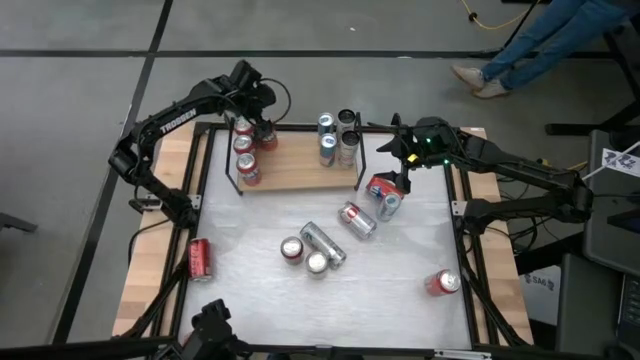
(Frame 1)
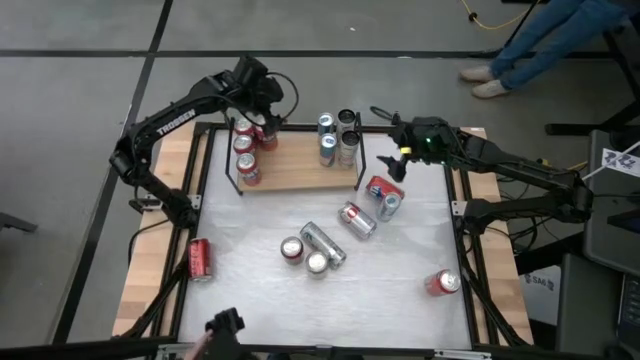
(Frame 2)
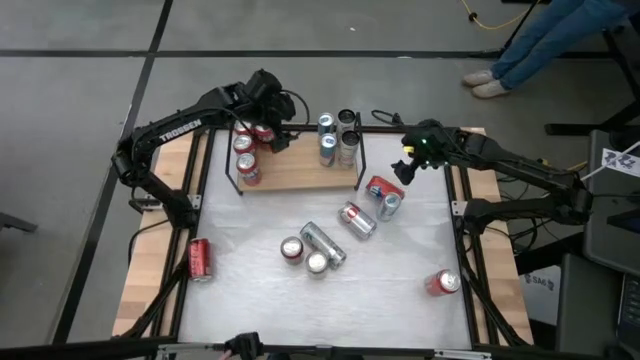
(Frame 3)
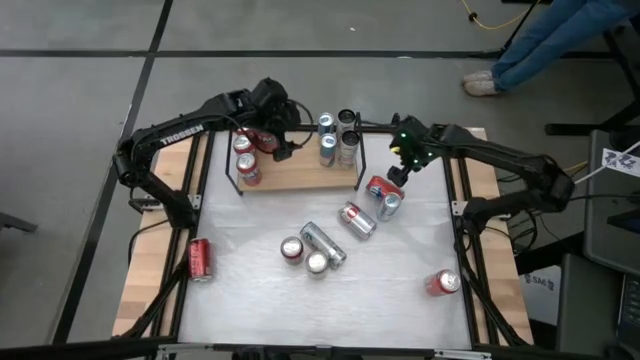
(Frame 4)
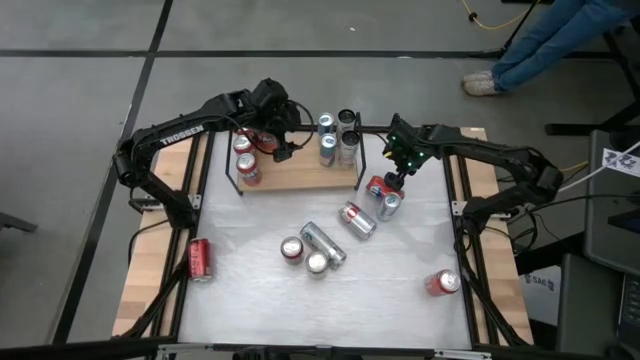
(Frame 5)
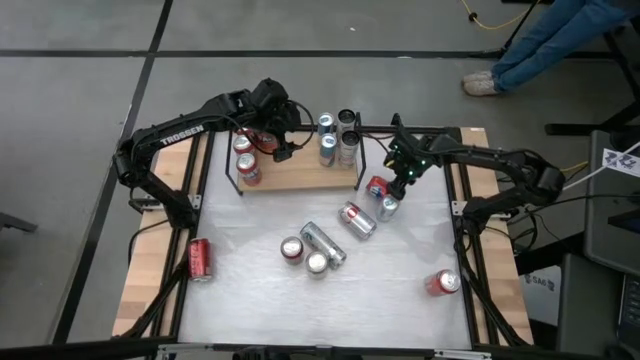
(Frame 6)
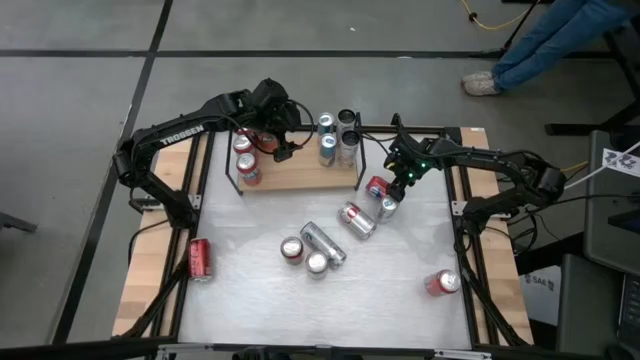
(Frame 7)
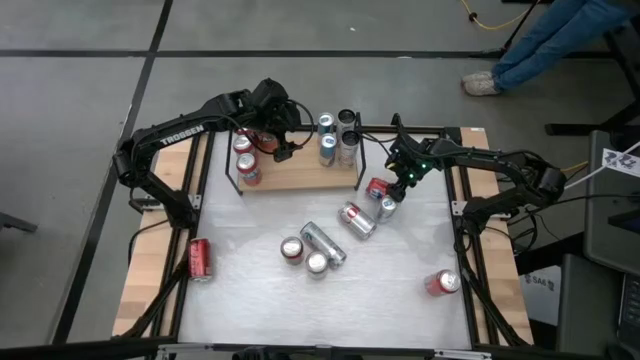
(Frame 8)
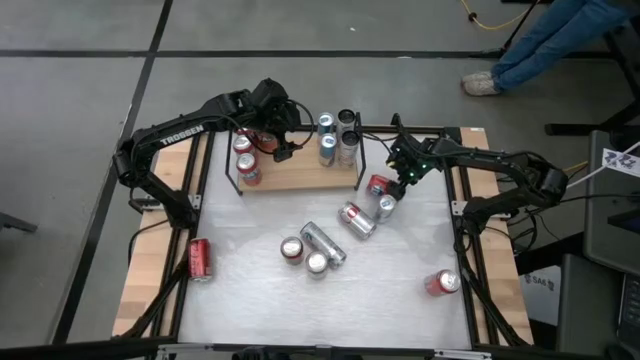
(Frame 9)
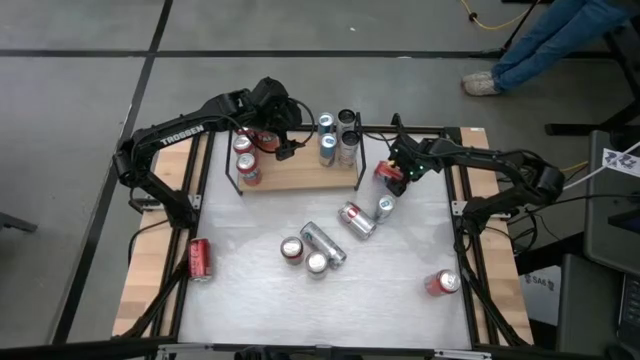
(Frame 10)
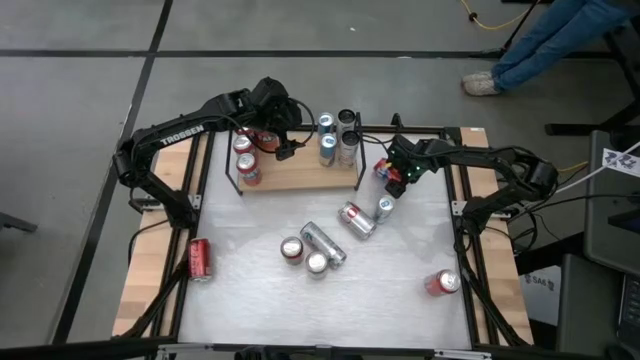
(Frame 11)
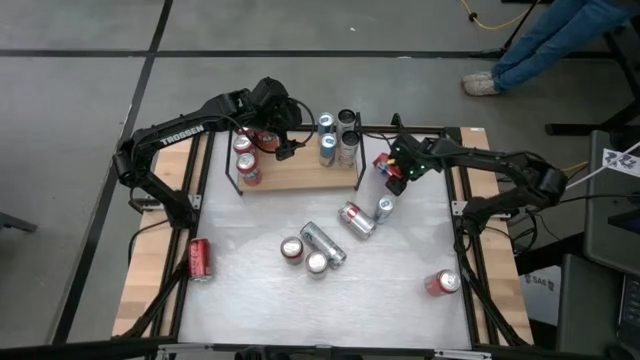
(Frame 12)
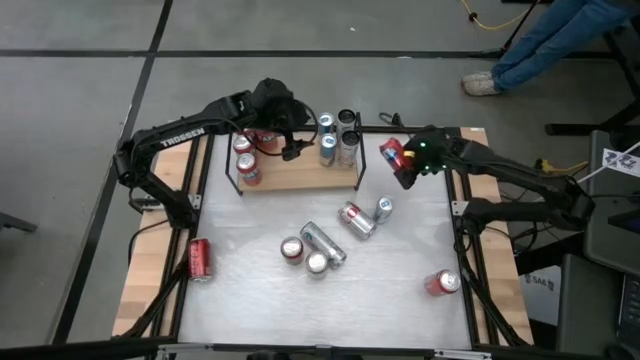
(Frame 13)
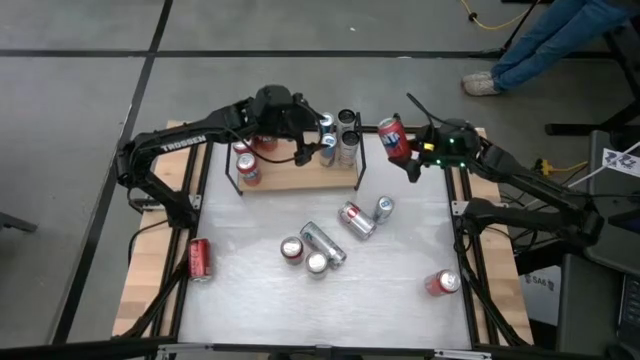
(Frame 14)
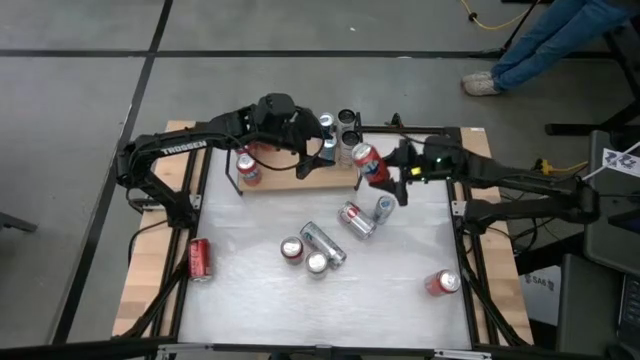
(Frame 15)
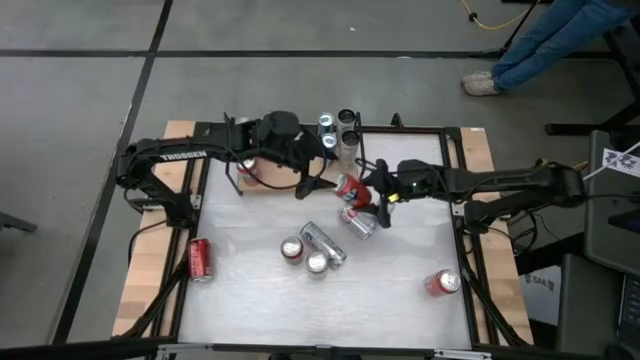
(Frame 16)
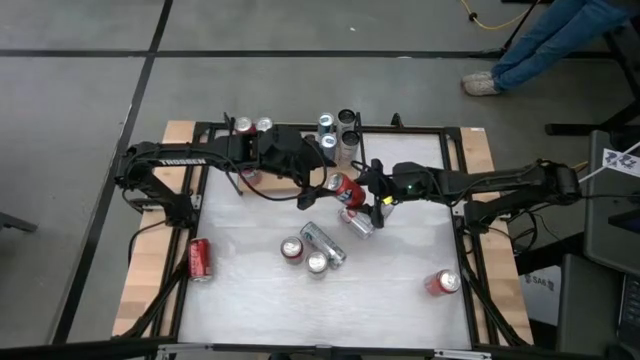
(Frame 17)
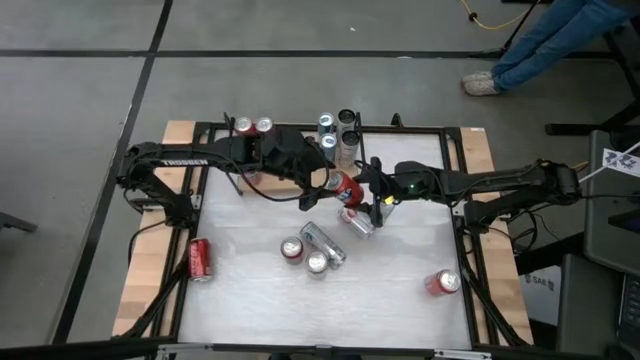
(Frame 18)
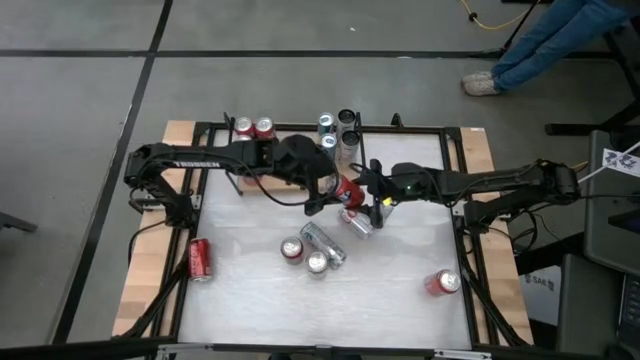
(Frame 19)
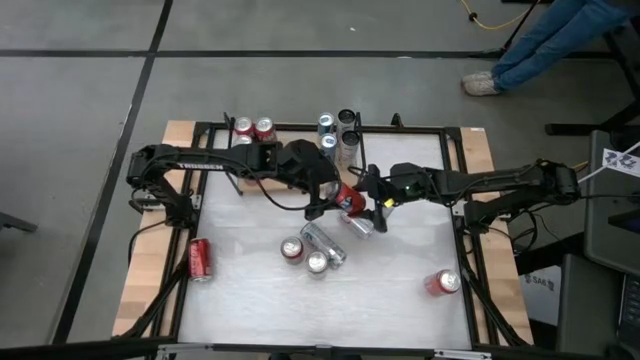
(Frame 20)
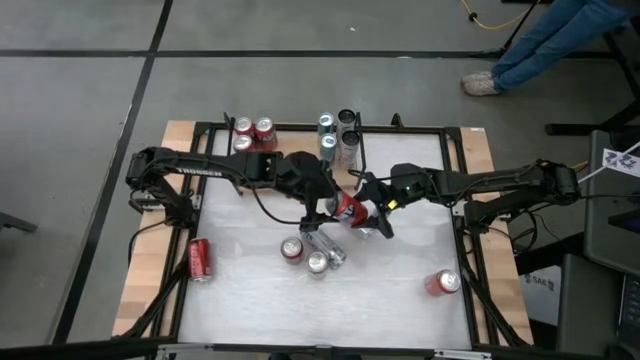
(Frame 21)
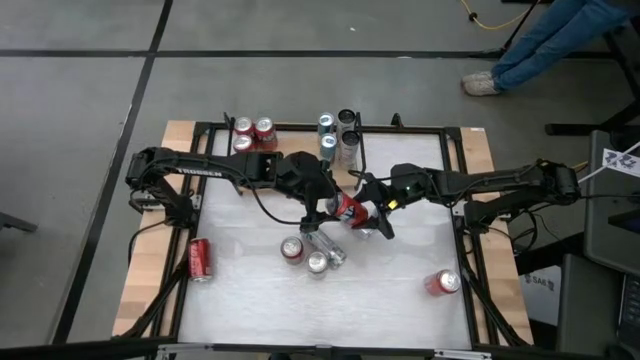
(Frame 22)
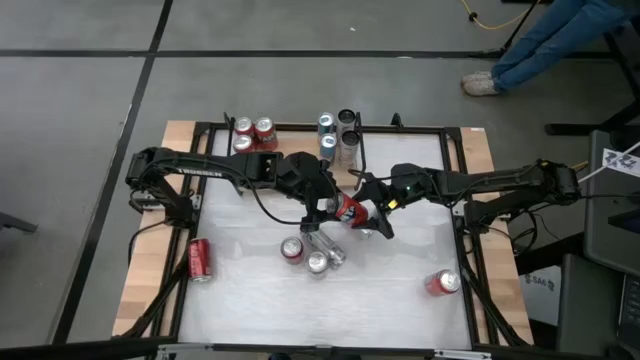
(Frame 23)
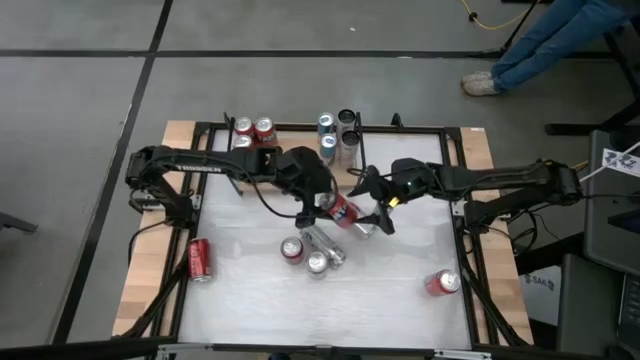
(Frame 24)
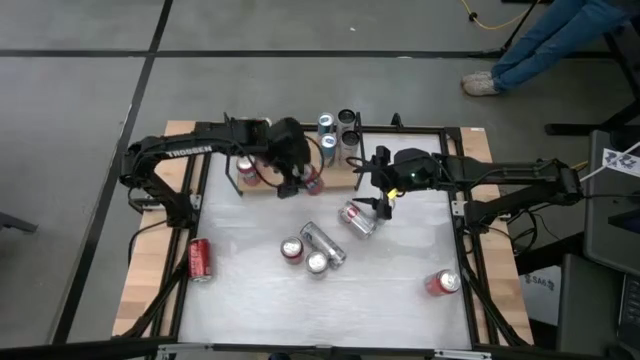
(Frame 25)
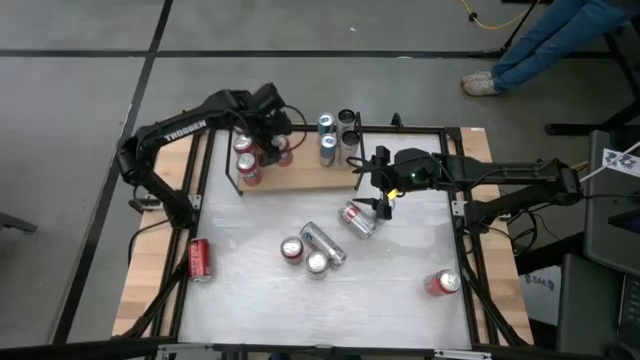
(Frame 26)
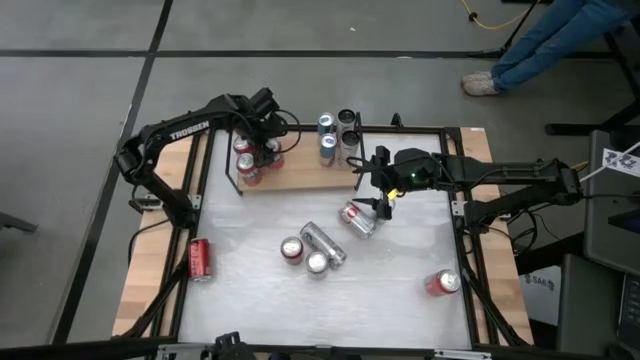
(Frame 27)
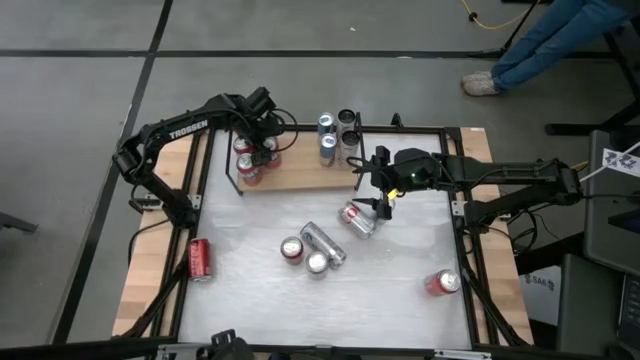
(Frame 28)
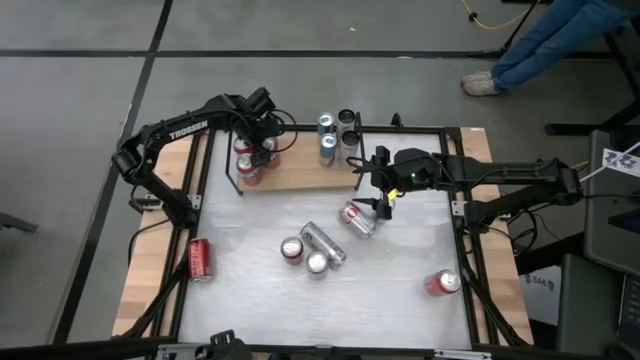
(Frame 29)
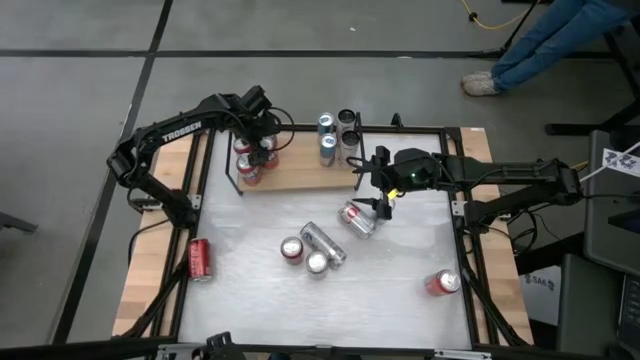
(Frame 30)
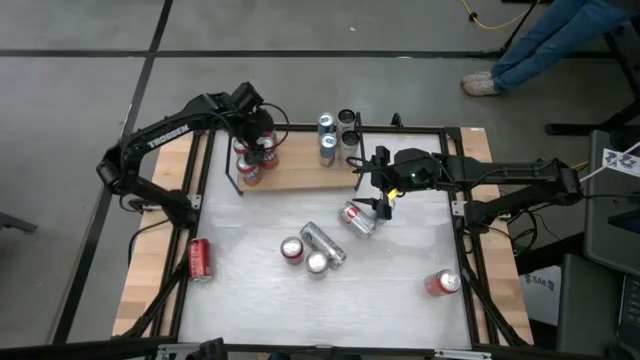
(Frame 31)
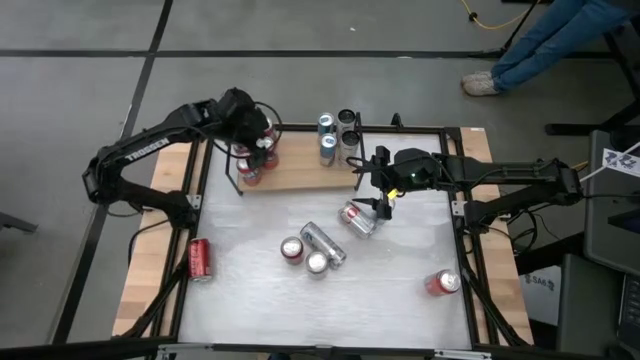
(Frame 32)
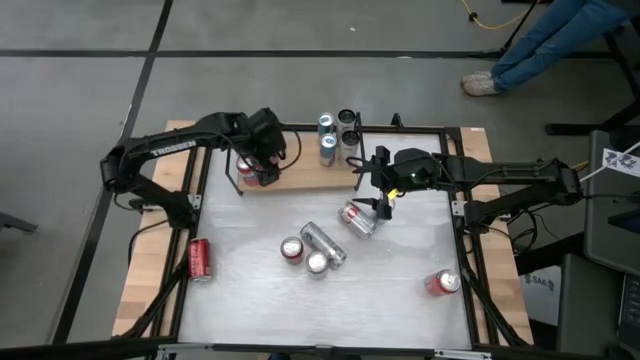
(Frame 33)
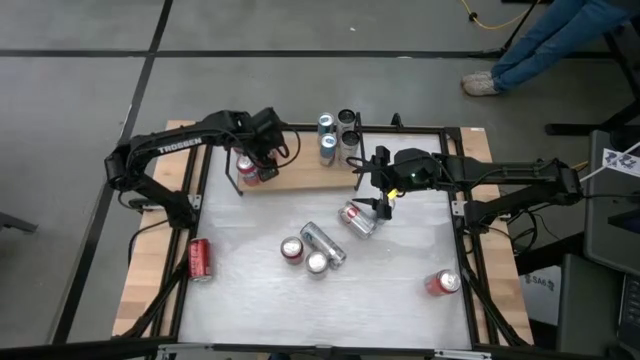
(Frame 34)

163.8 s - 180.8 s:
Task: Place canned beverage on shelf
Put the red soda can on the shelf aligned with the other red soda can

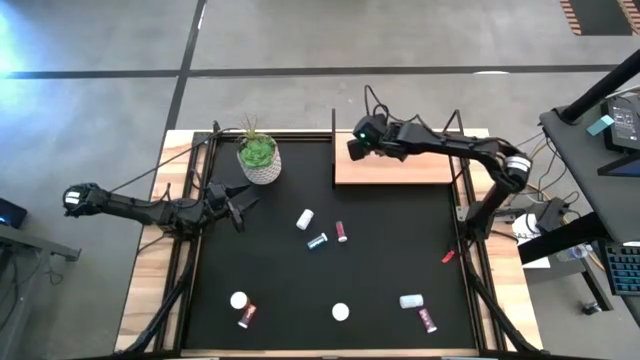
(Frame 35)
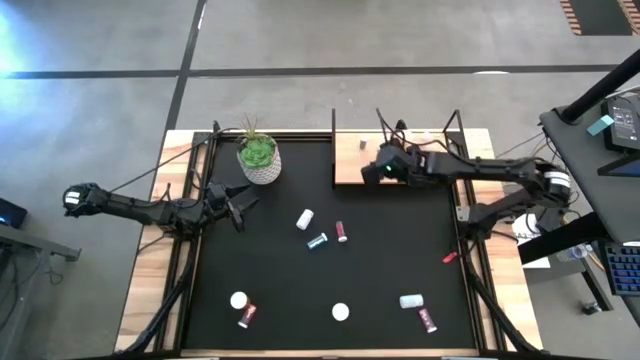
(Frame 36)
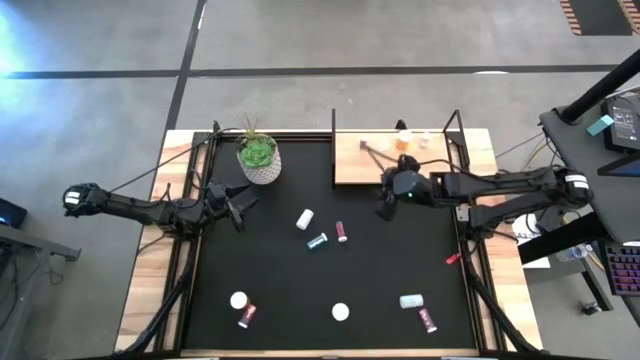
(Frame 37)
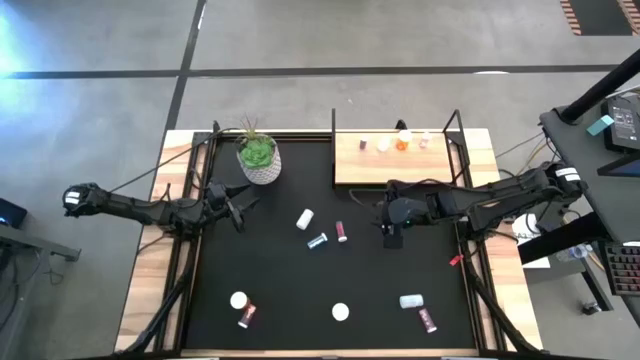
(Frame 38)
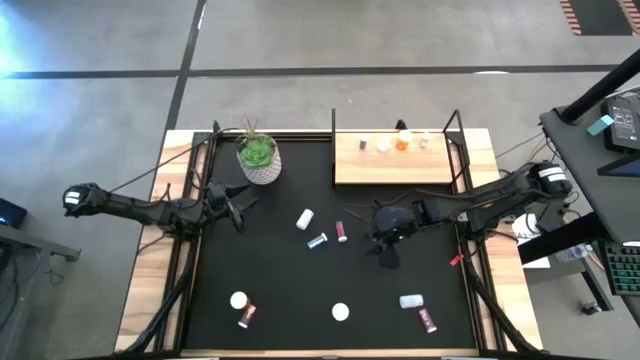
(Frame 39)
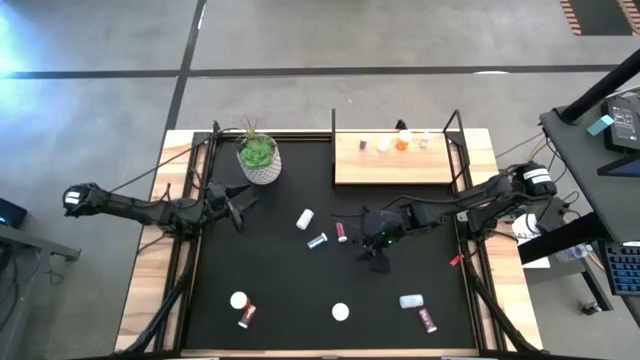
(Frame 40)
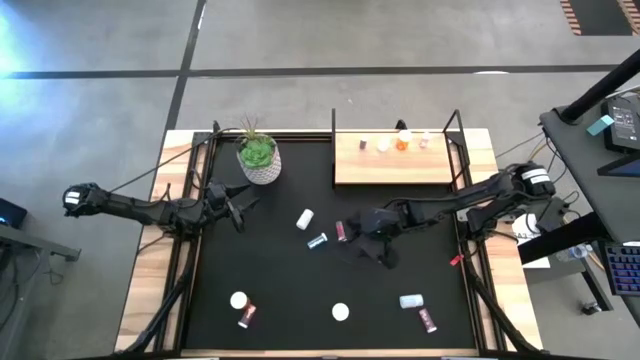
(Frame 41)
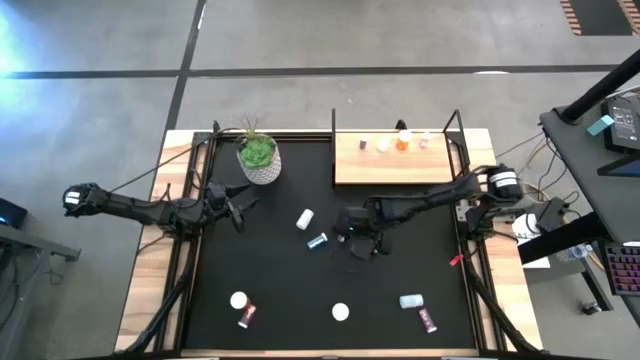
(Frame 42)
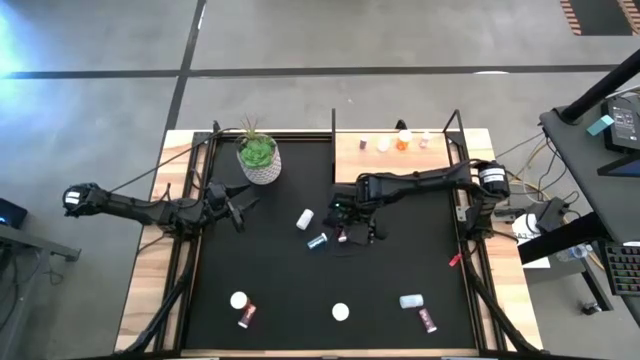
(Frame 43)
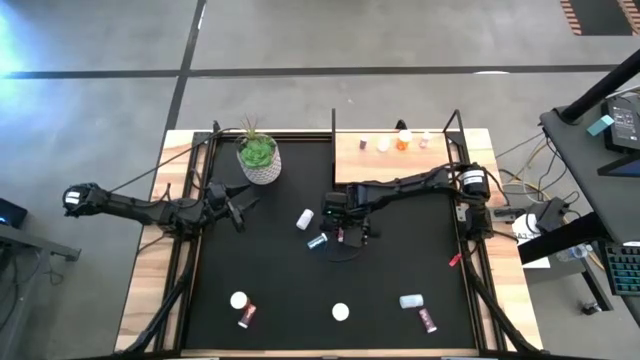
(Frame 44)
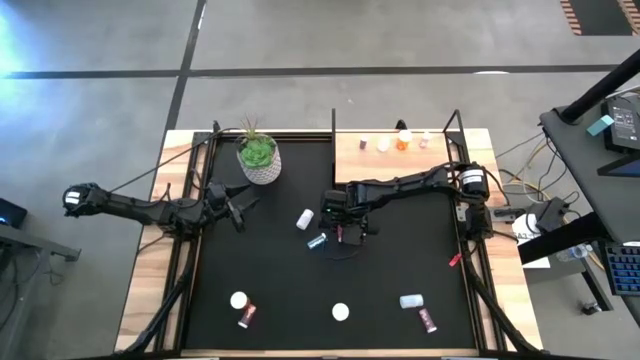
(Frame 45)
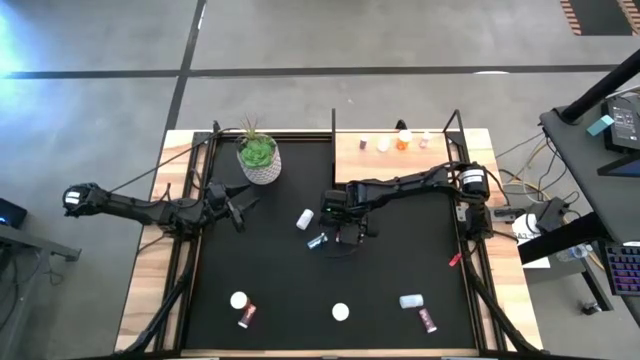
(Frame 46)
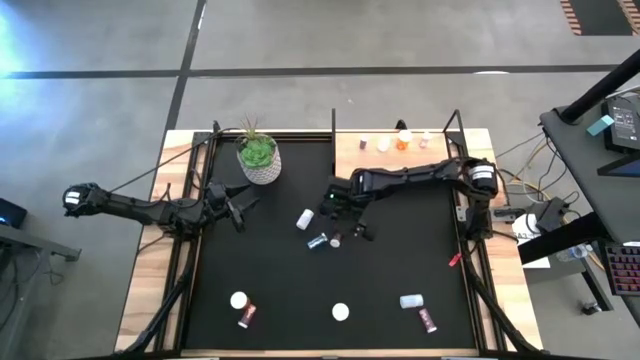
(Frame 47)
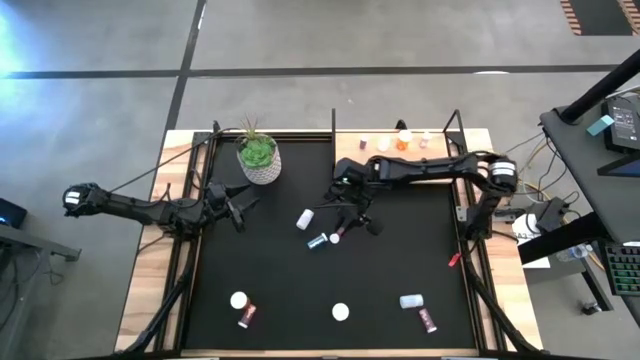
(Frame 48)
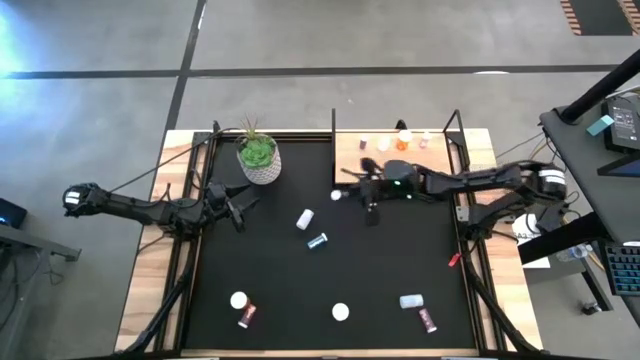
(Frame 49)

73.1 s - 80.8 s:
Task: Pick and place medicine bottles onto shelf by color
Put the right blue pill bottle on the shelf aligned with the other blue pill bottle
